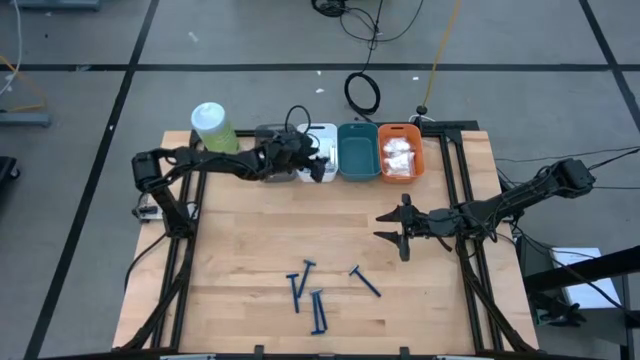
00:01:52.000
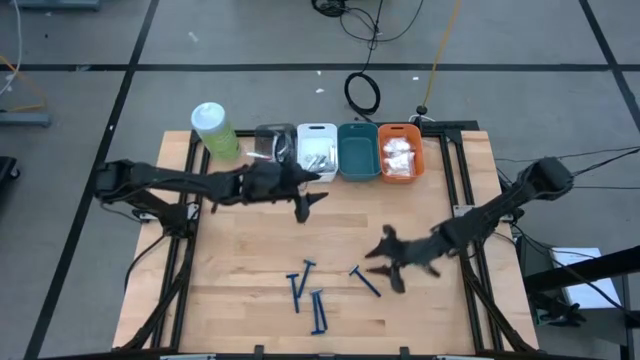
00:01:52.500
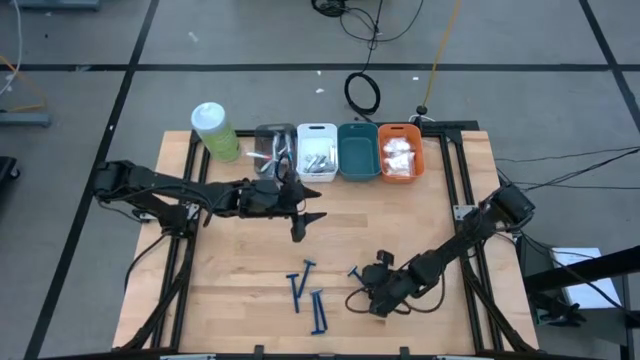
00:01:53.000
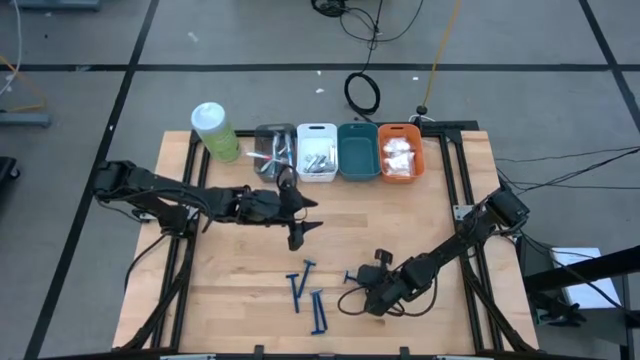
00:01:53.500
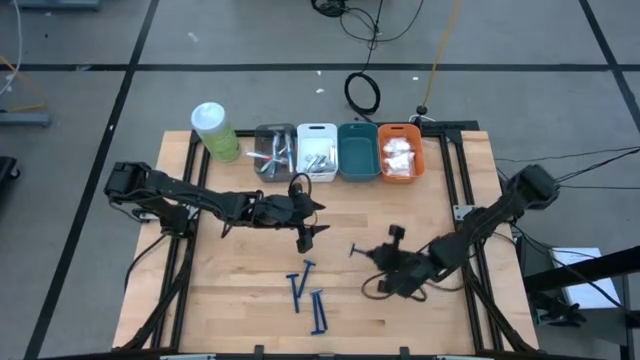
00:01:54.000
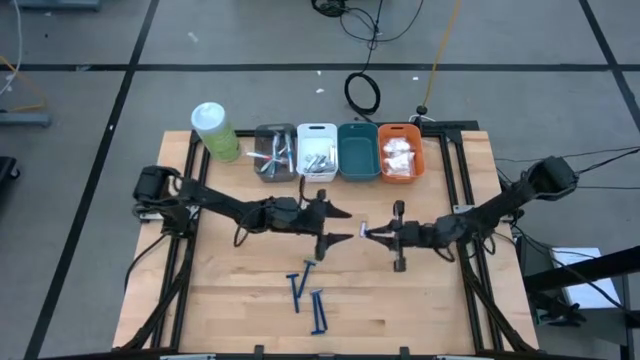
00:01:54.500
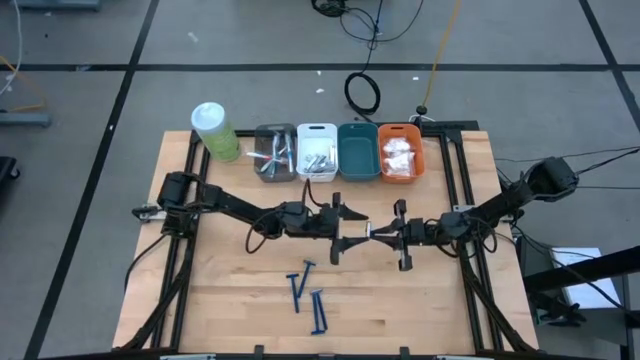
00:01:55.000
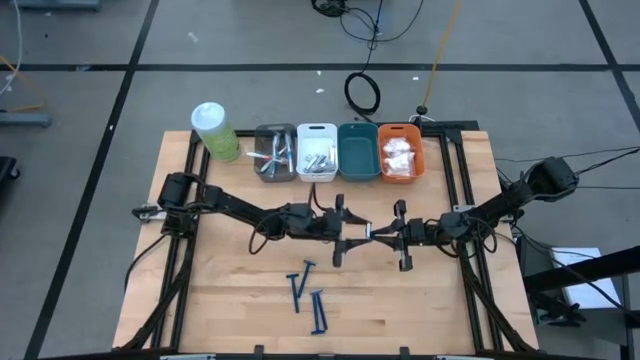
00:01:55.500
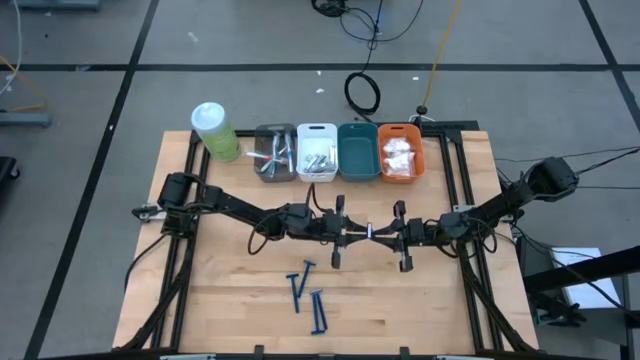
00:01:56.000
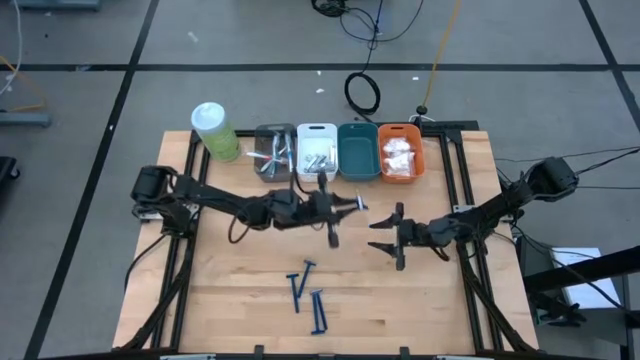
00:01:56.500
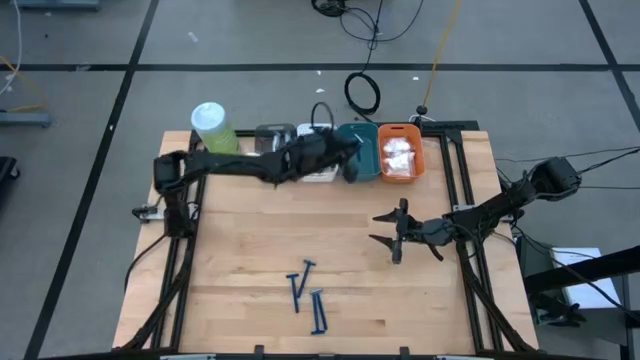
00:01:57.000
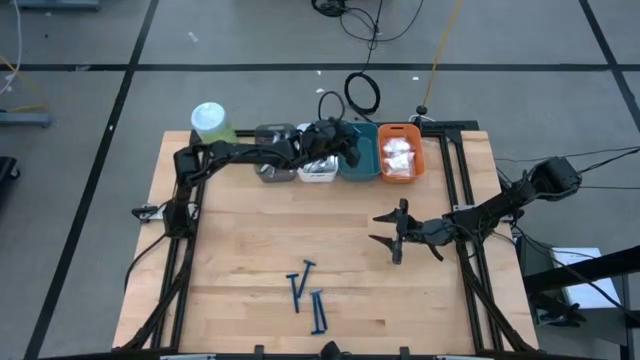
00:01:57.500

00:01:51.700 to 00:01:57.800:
Task: Pick & Place Travel size toiletries
Put the blue razor into the blue bin

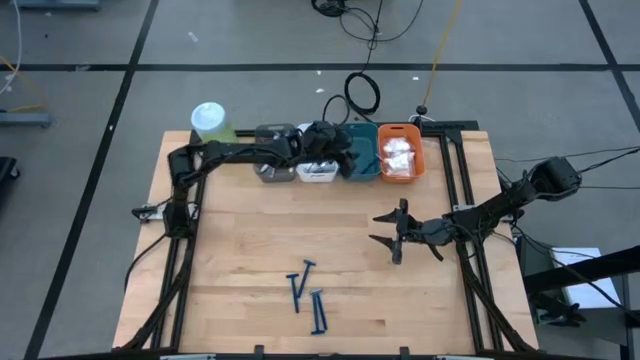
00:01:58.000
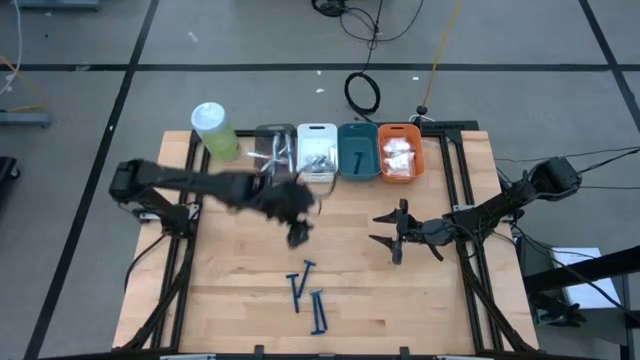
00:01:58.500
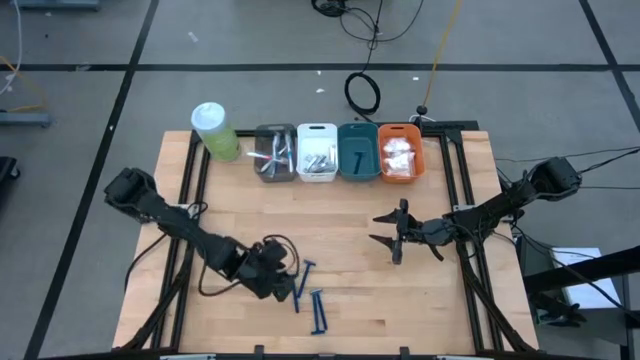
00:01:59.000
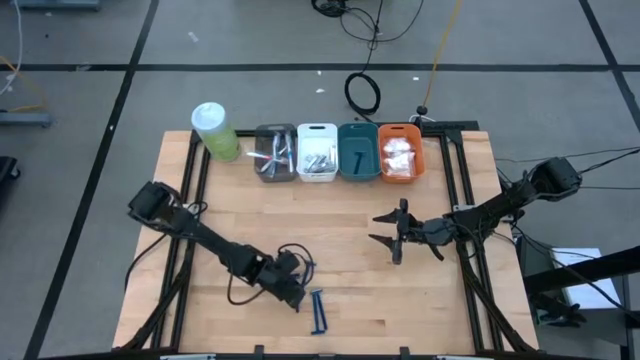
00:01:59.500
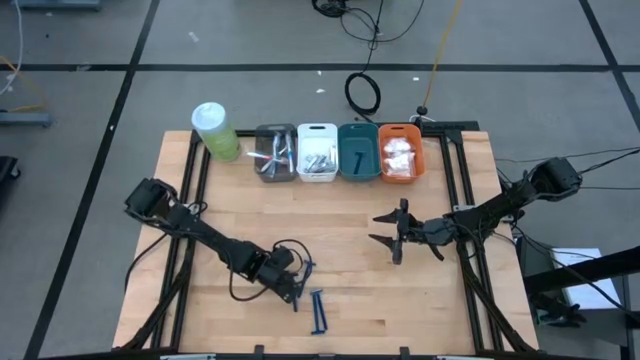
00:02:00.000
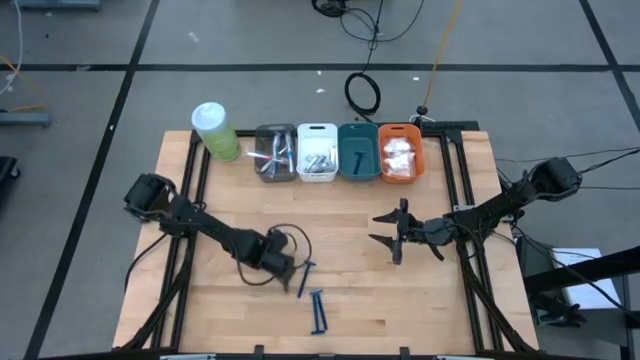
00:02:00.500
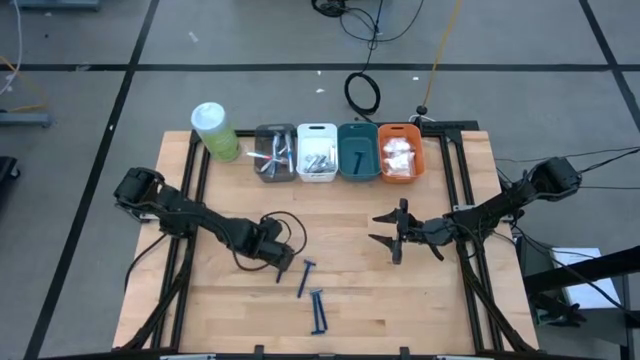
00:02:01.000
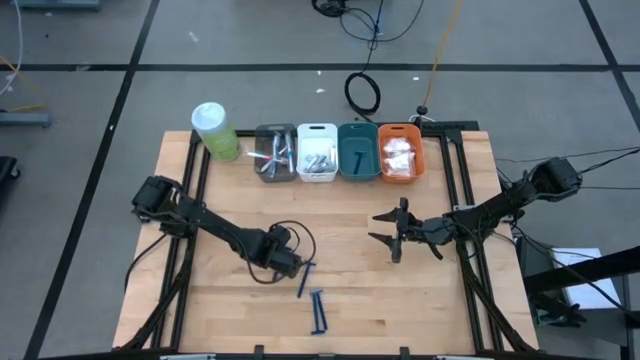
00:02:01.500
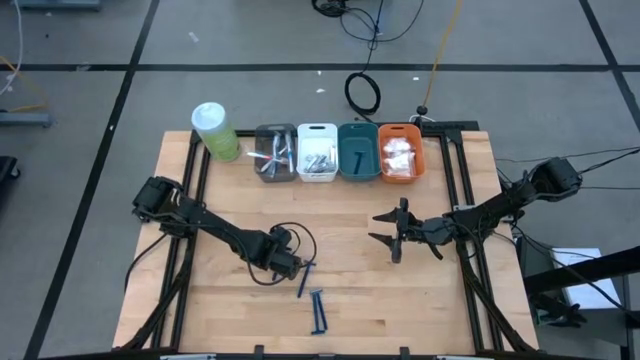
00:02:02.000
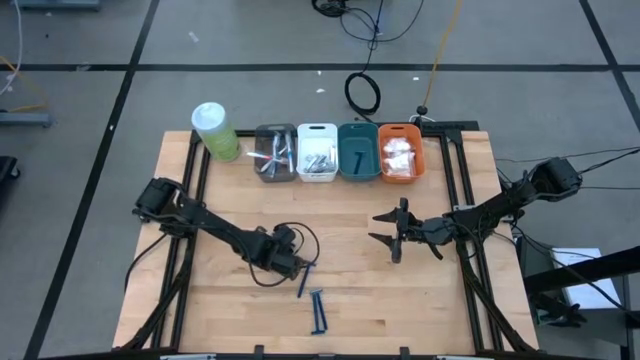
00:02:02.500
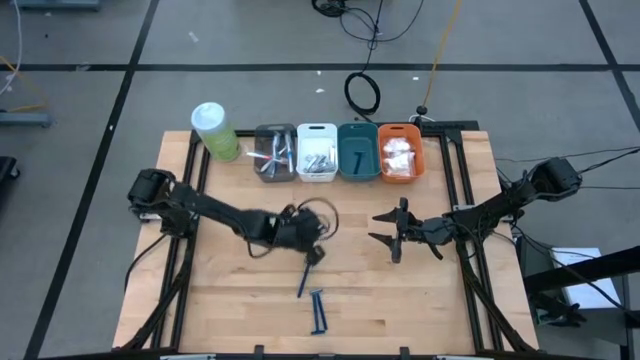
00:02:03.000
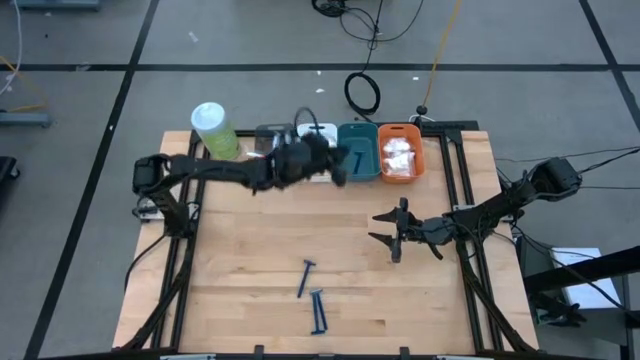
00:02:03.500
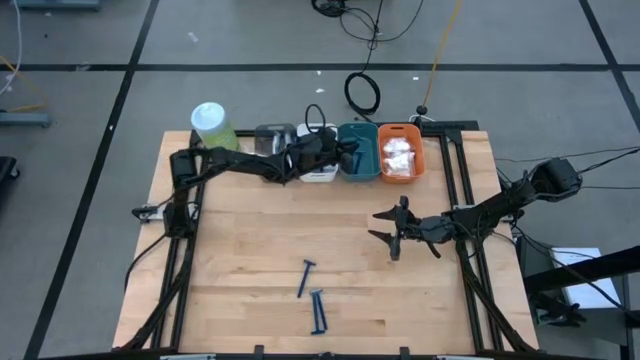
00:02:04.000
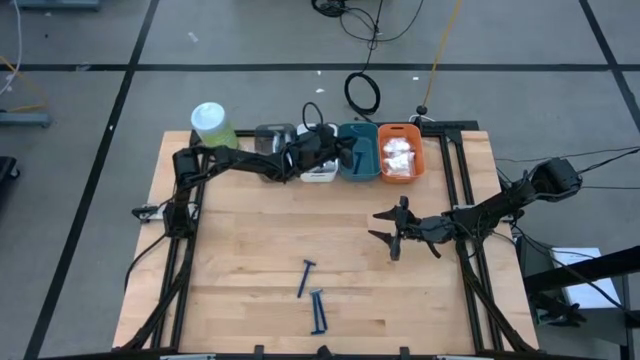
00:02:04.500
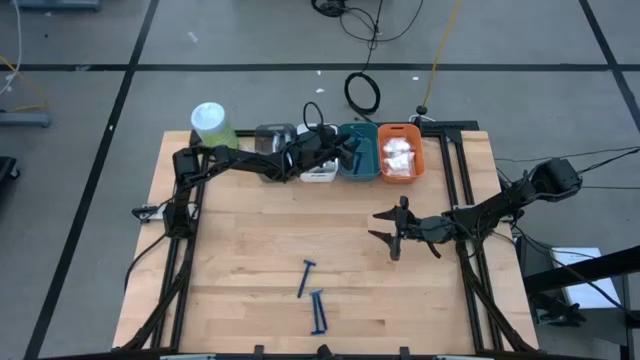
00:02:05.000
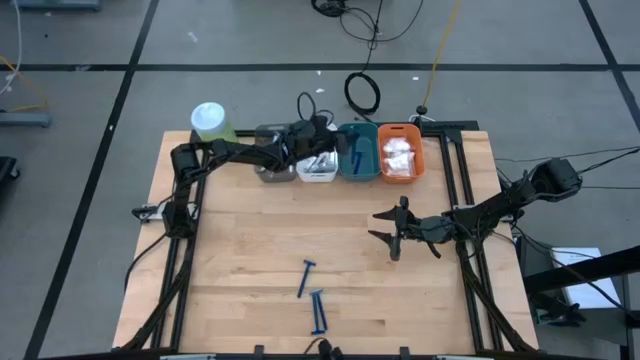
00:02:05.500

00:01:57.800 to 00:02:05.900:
Put the blue razor into the blue bin

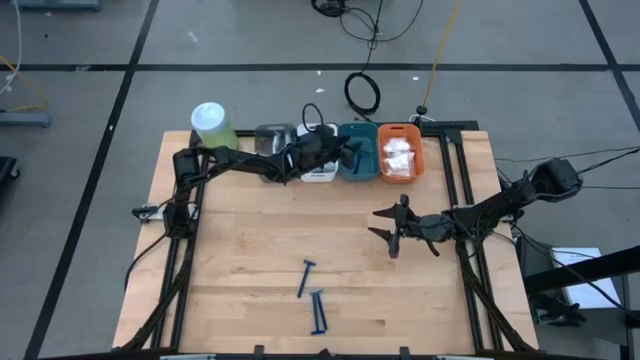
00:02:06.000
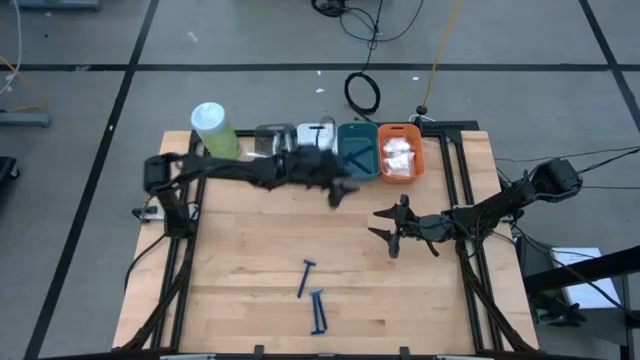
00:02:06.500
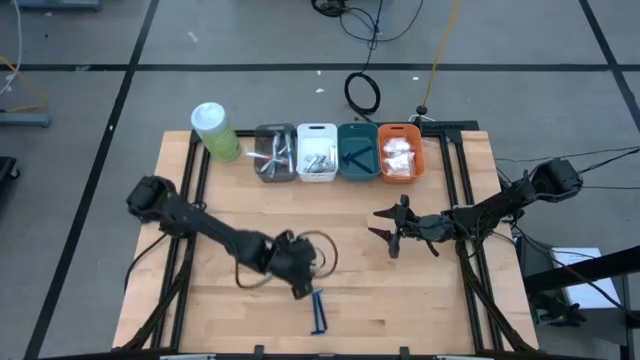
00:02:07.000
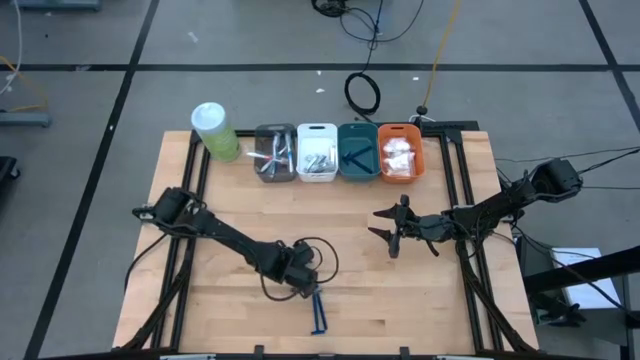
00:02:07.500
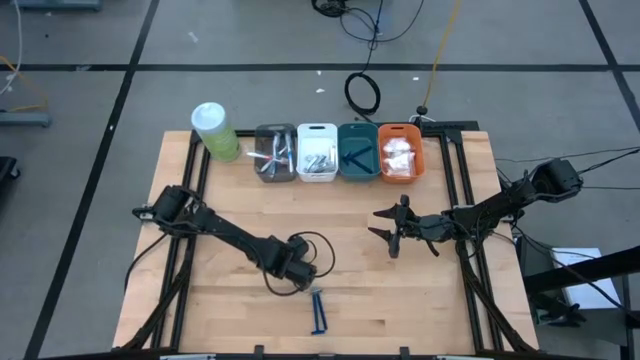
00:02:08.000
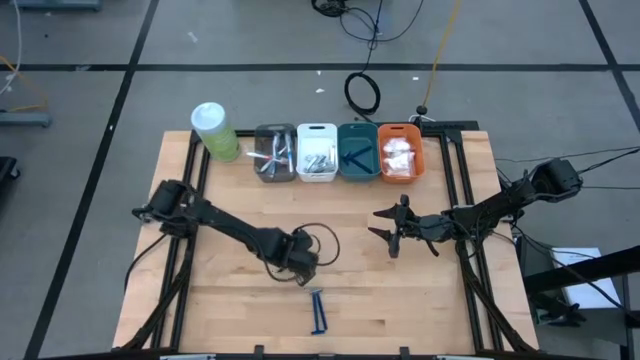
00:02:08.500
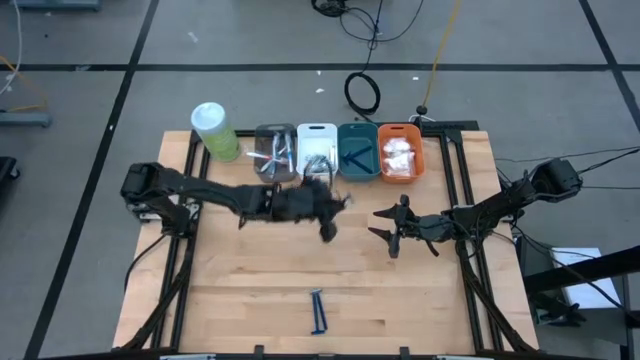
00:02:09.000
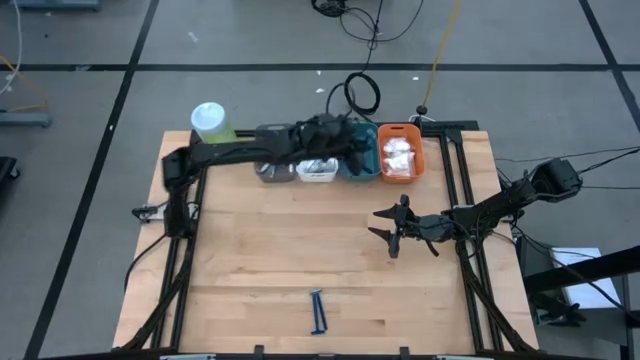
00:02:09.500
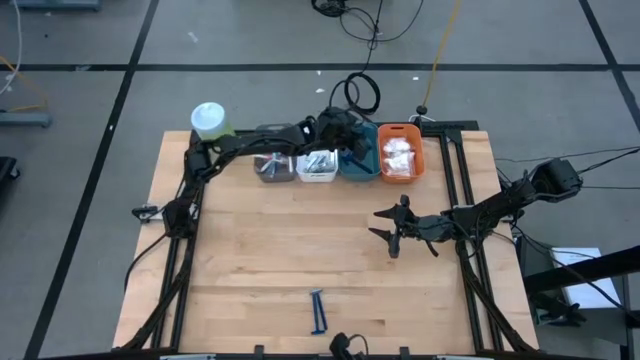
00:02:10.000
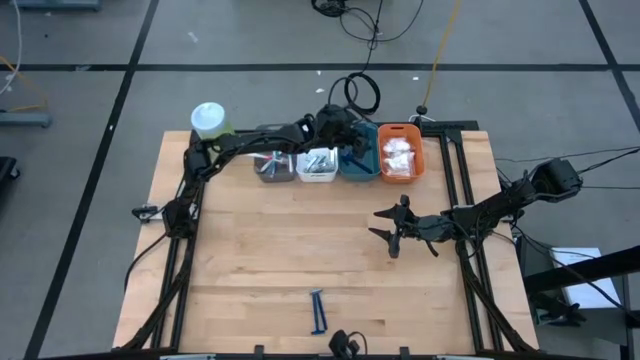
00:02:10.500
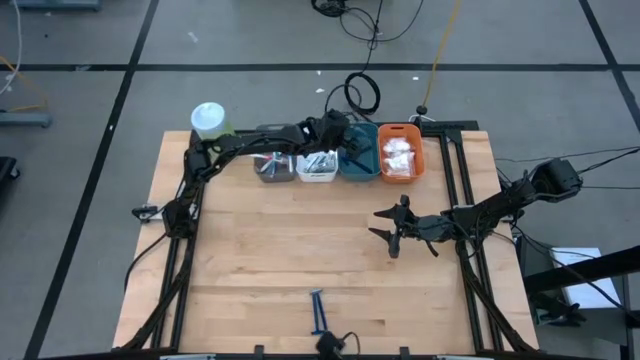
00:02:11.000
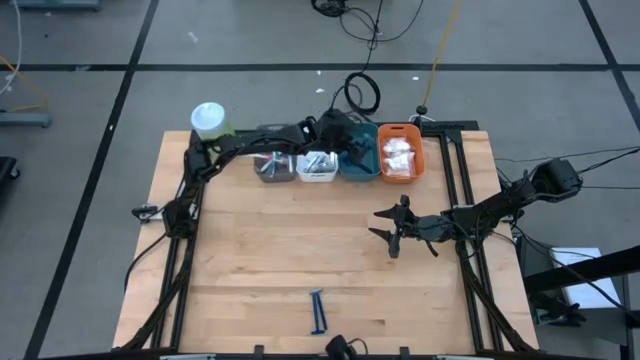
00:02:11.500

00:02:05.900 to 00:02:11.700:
Put the blue razor into the blue bin

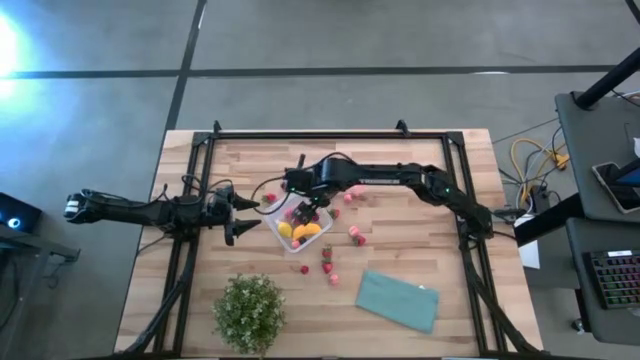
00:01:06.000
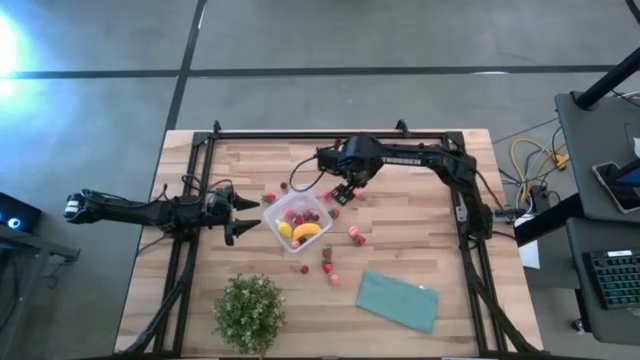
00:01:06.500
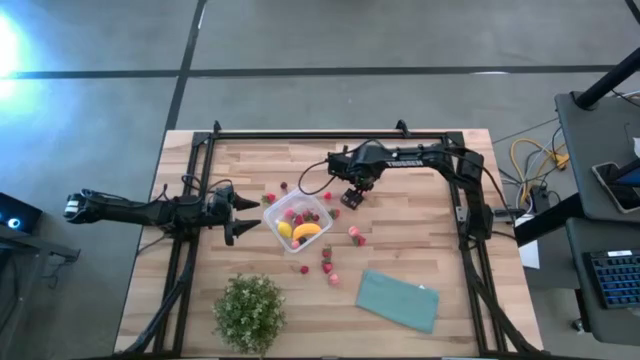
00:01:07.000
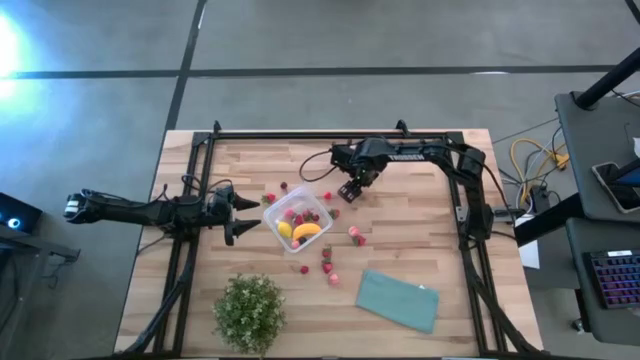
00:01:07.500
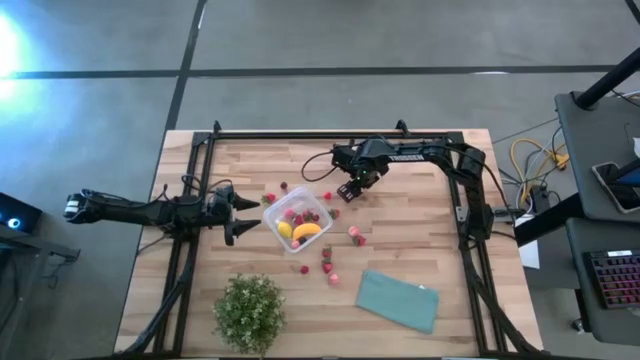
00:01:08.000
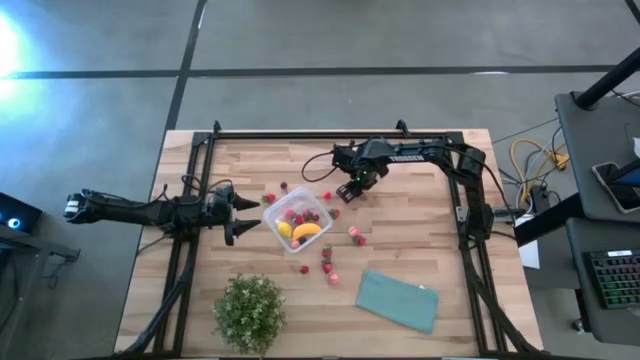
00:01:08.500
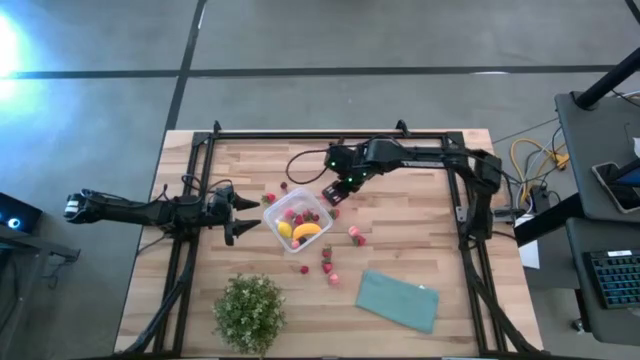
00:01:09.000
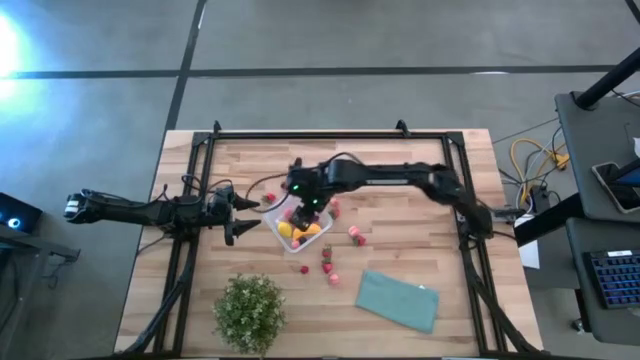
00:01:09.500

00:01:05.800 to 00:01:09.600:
Task: Pick and placing Produce into tupperware
Put the pink peach into the transparent bin
